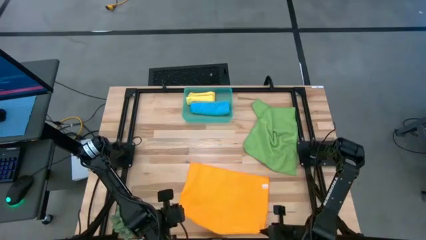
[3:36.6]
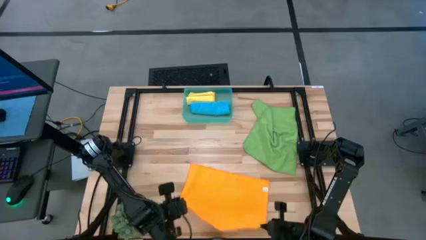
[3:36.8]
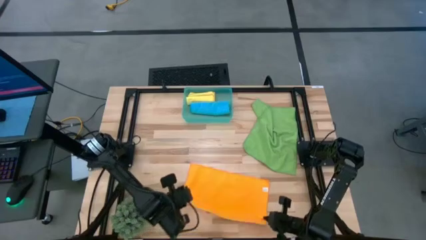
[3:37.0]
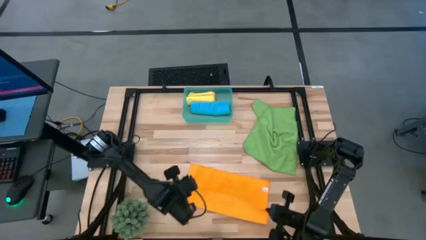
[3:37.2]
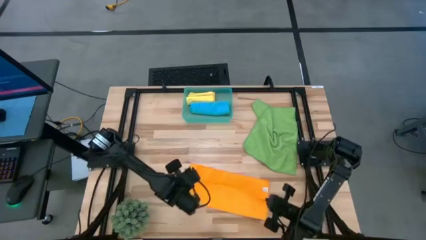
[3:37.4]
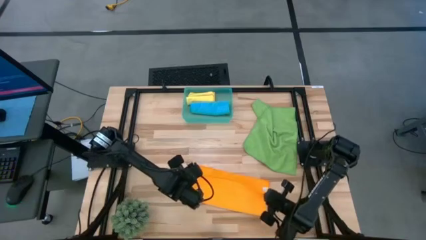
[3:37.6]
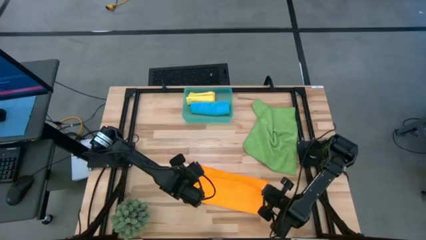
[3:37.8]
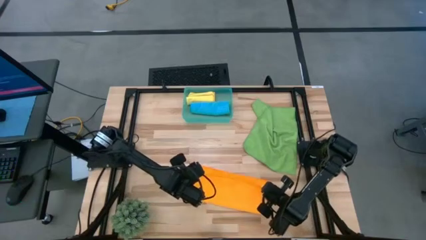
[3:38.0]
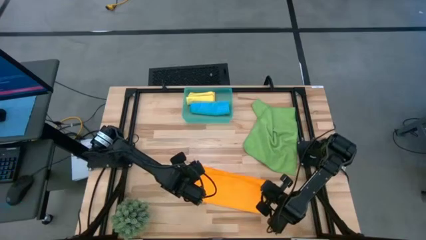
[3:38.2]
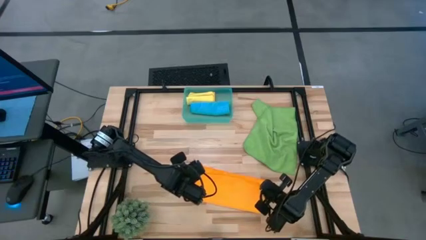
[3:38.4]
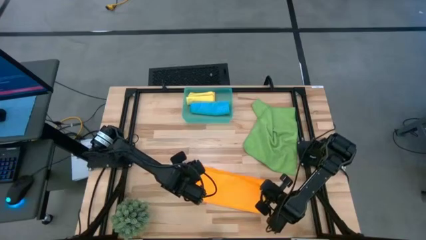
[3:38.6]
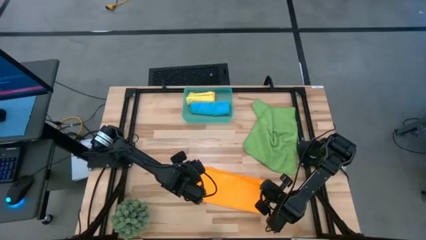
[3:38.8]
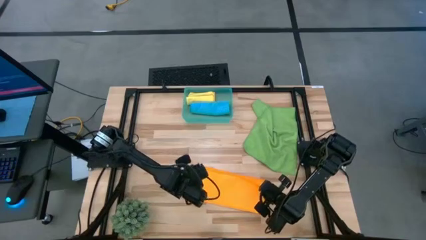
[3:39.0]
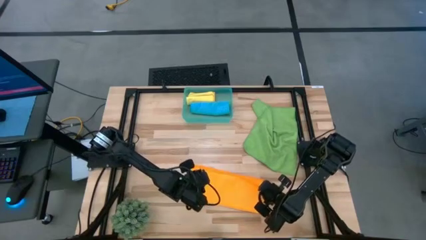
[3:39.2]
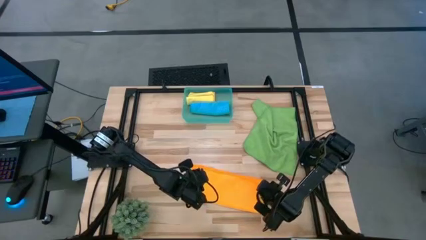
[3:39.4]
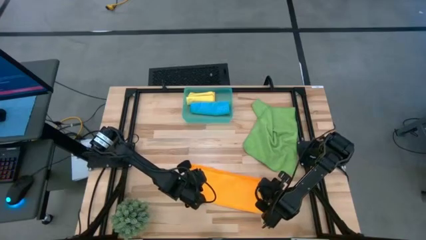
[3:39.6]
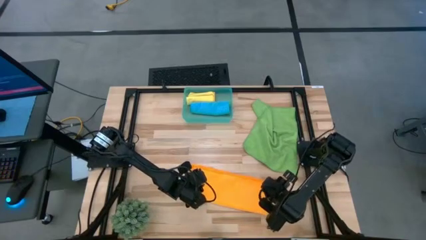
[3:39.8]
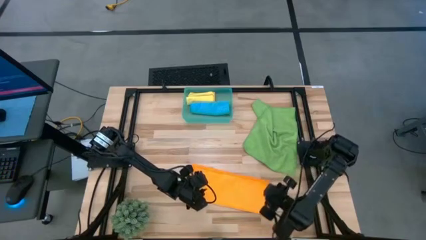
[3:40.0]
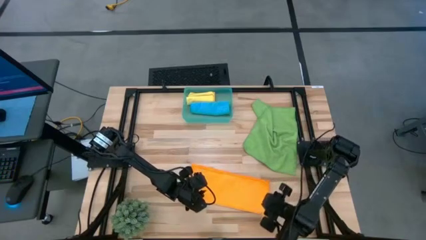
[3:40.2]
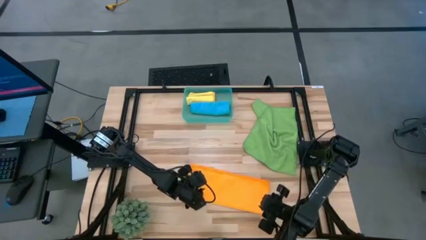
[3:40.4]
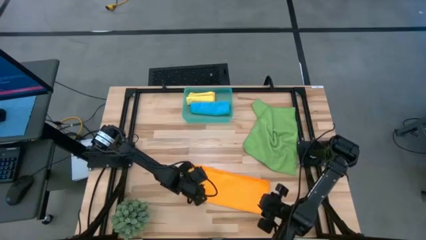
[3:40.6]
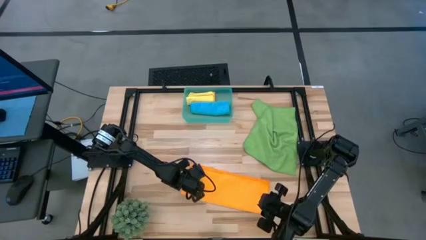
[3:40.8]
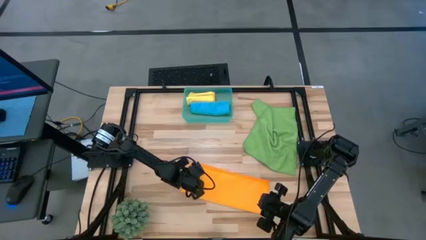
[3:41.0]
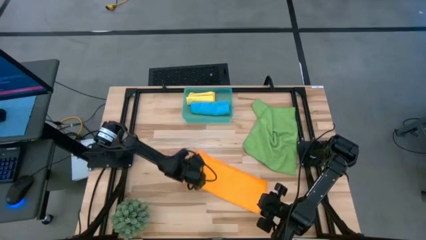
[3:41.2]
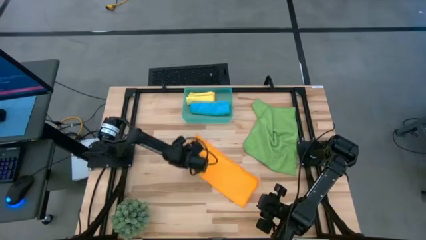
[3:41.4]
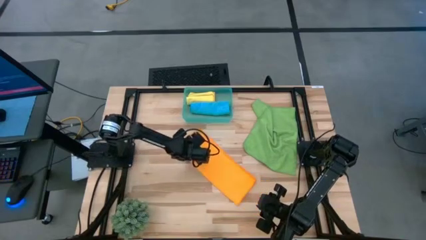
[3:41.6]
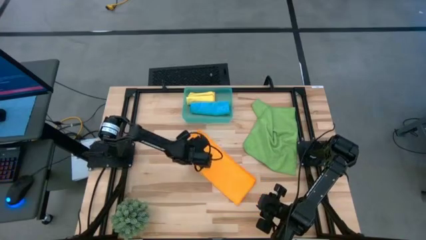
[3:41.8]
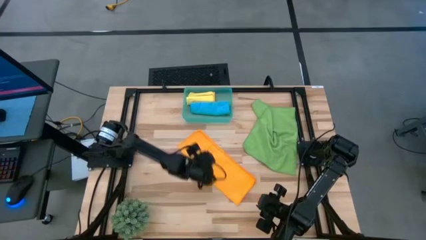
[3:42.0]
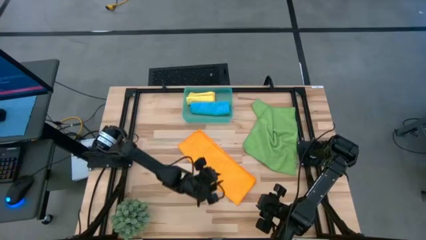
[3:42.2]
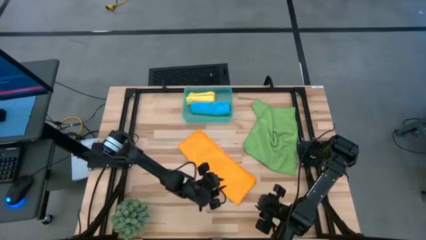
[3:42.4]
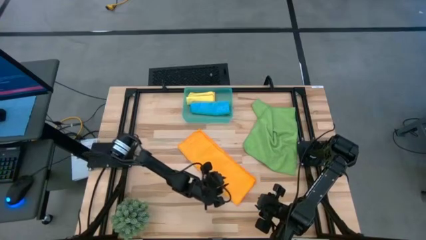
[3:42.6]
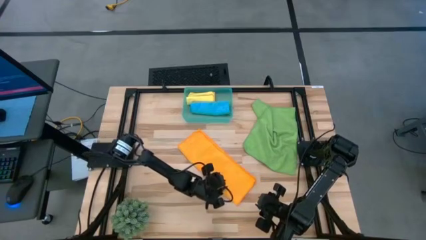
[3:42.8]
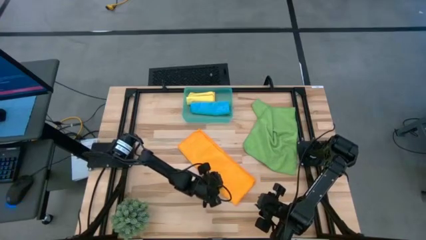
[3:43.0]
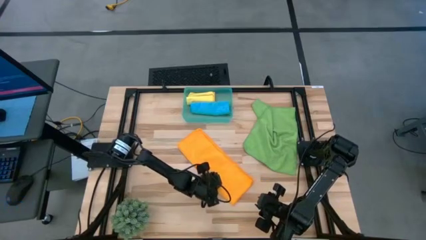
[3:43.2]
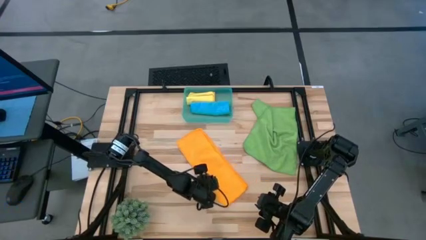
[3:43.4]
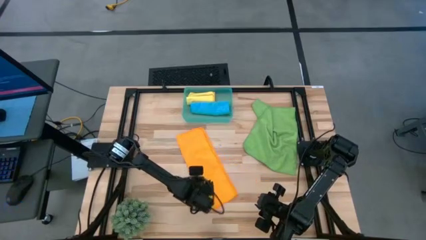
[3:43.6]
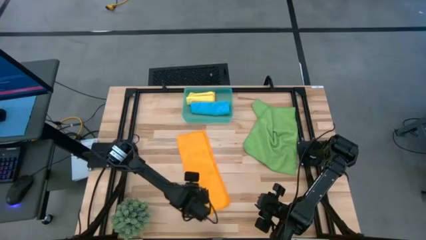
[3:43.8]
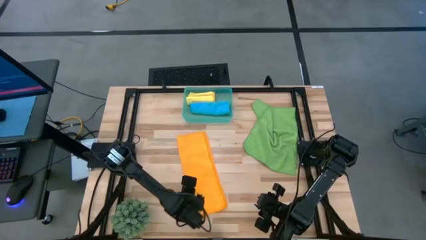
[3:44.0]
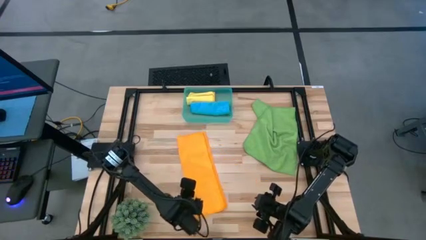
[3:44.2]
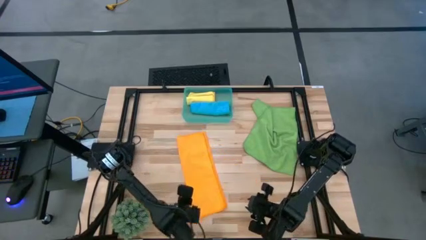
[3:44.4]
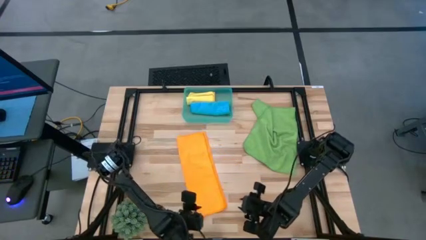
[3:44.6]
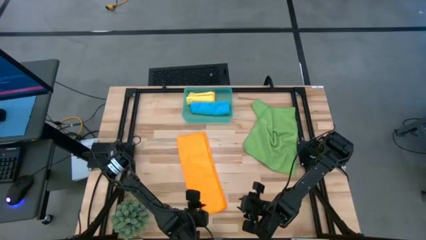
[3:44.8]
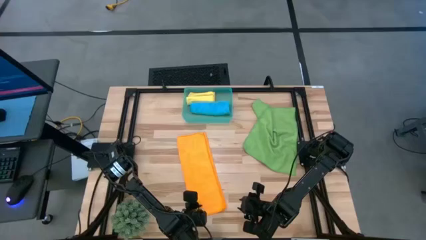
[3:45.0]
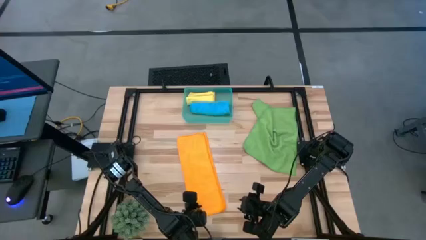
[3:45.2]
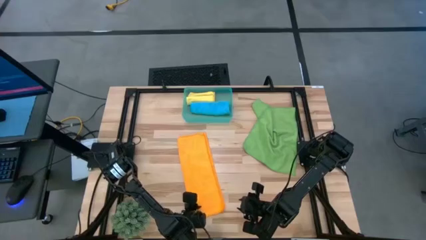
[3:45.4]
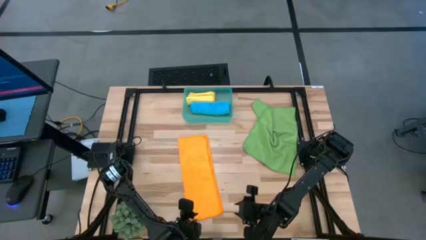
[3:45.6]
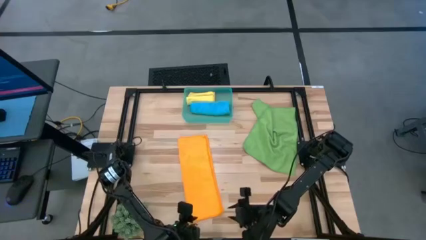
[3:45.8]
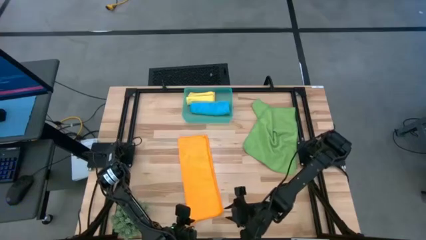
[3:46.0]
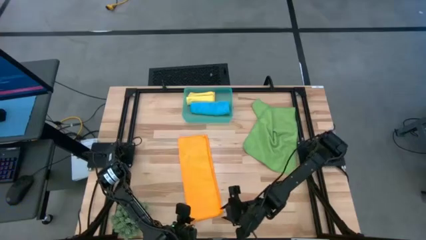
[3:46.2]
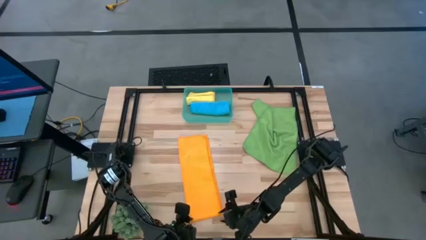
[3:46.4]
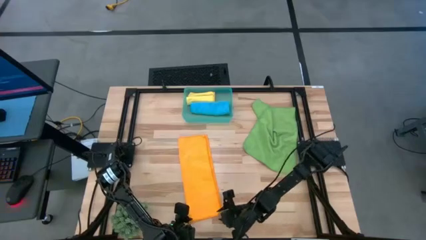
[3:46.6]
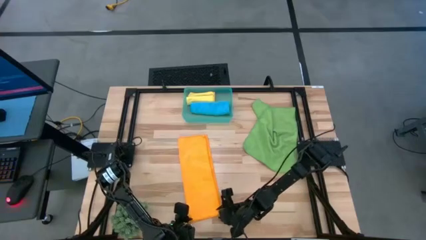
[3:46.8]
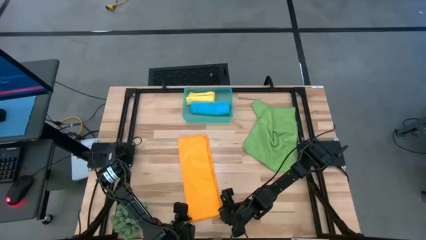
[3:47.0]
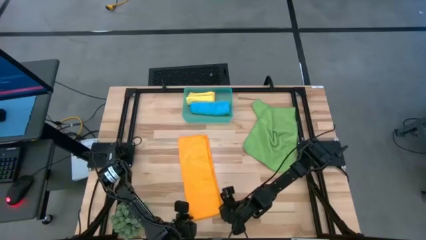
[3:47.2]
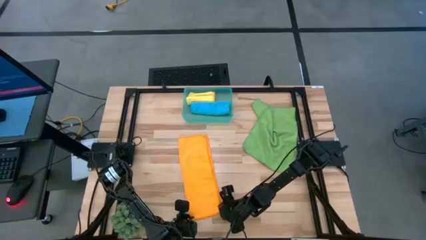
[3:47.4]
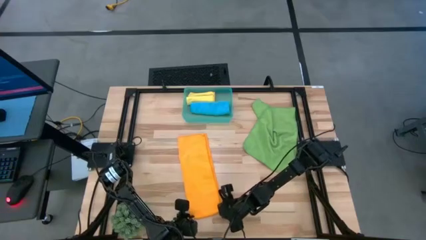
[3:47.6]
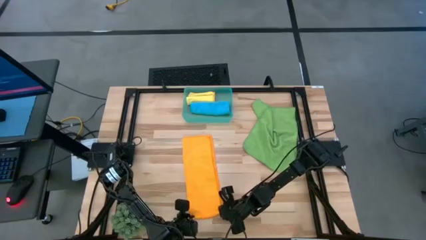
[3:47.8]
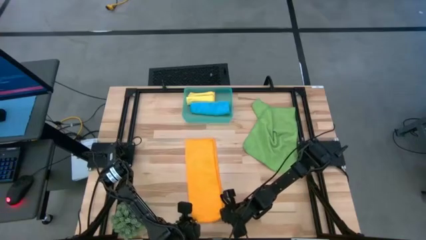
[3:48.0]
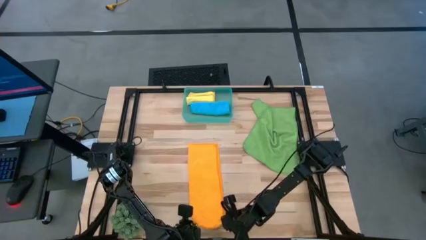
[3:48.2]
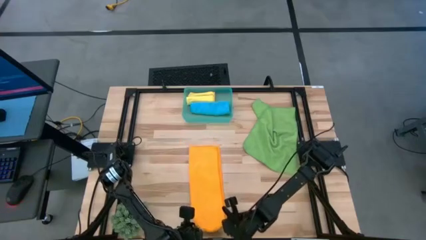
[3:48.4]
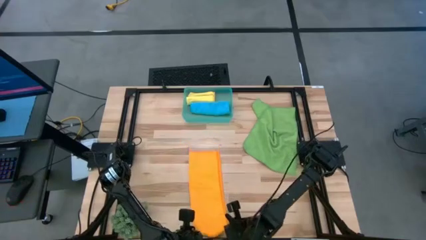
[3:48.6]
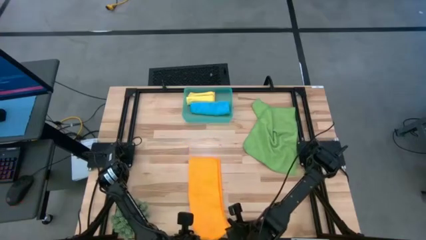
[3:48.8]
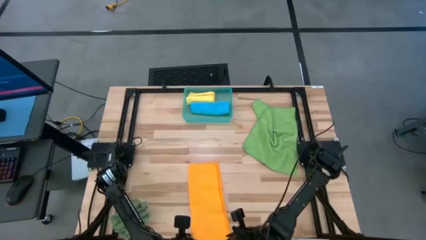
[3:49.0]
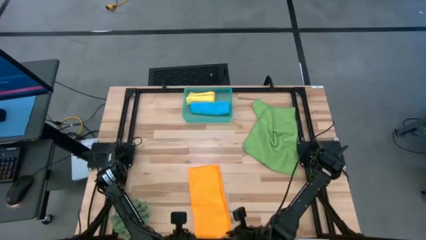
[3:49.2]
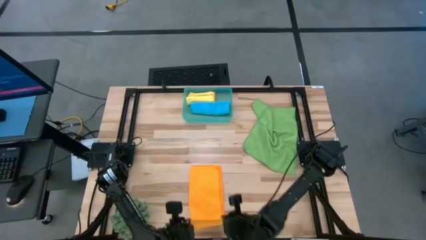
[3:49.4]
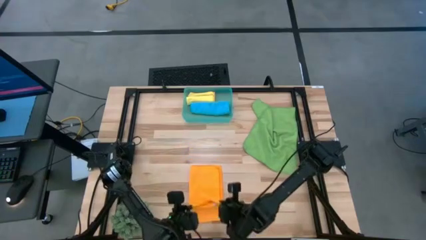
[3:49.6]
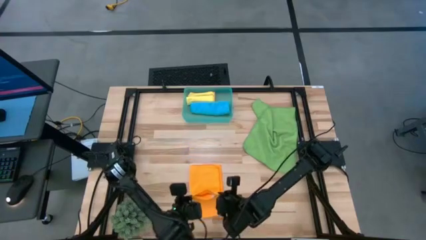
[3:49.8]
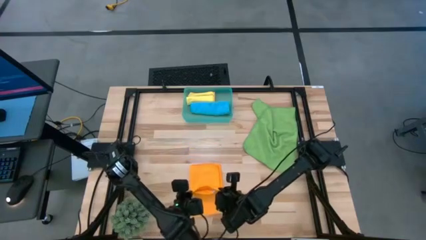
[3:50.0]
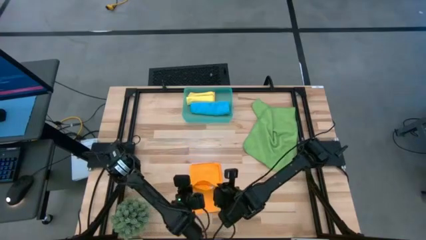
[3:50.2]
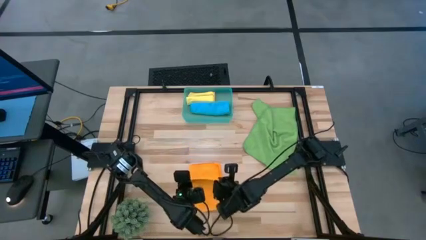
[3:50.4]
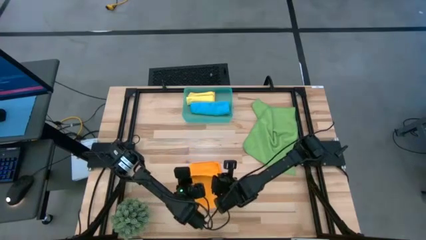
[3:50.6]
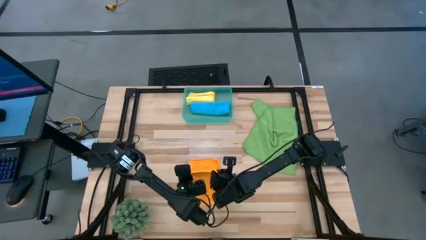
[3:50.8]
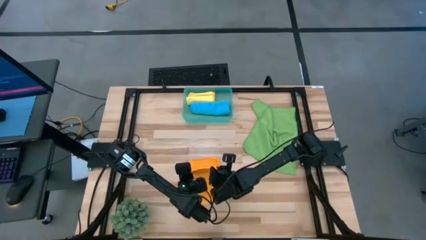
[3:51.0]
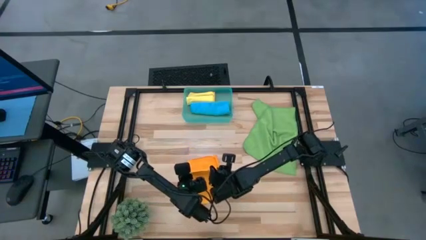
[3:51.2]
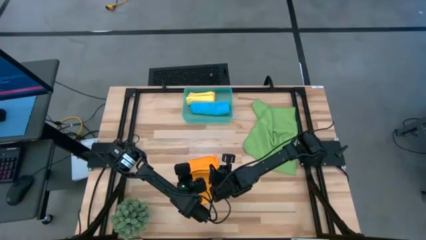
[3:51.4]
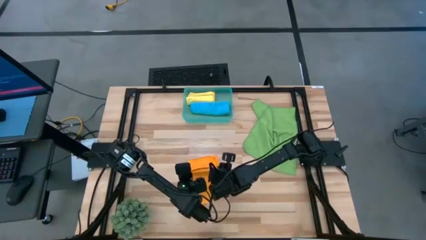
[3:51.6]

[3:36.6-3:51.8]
Task: Roll microfiber towels into tight, uniform cylinder then place into a basket
Fold the orange microfiber towel
